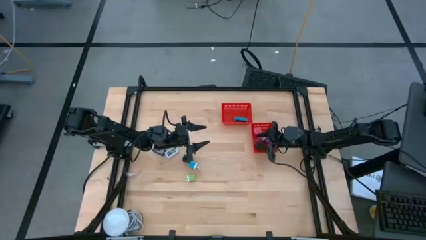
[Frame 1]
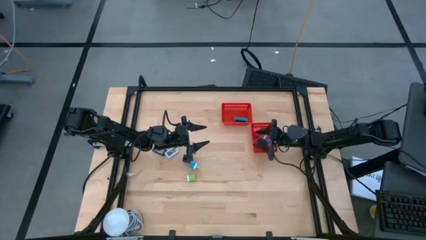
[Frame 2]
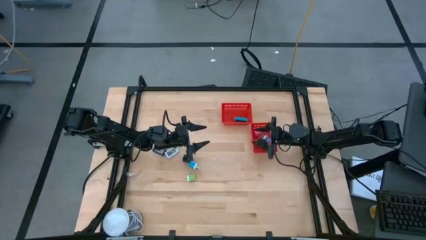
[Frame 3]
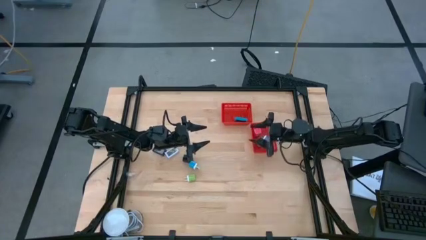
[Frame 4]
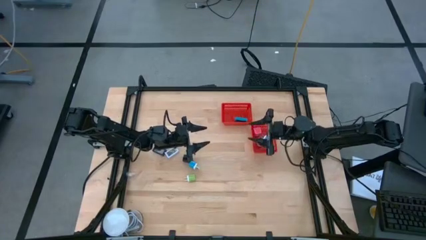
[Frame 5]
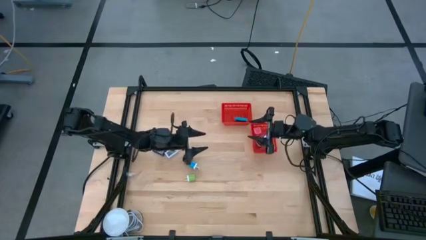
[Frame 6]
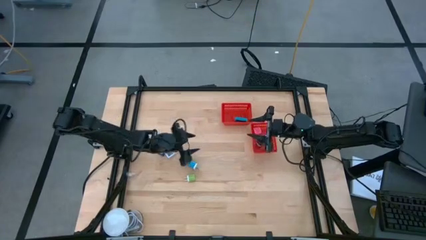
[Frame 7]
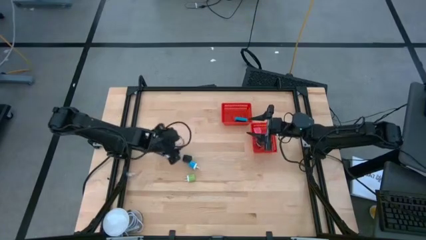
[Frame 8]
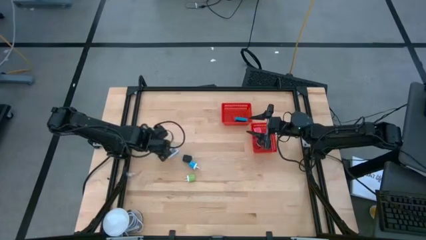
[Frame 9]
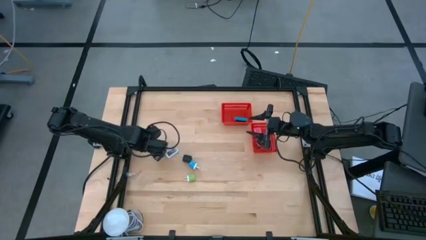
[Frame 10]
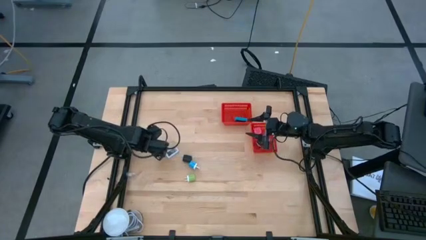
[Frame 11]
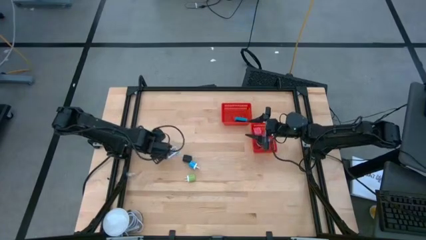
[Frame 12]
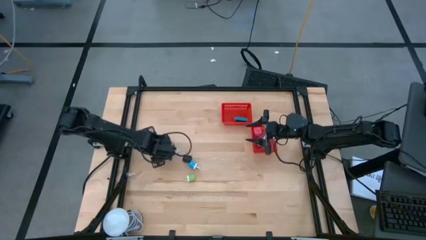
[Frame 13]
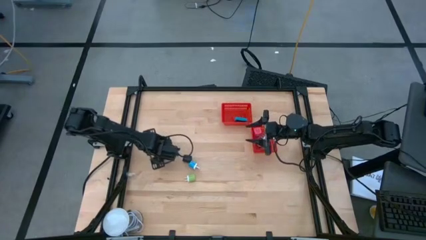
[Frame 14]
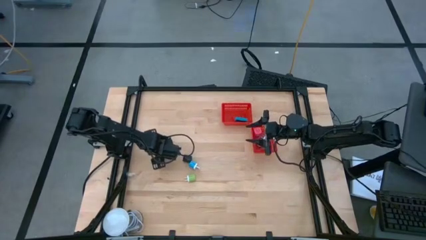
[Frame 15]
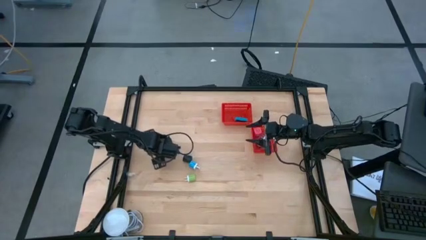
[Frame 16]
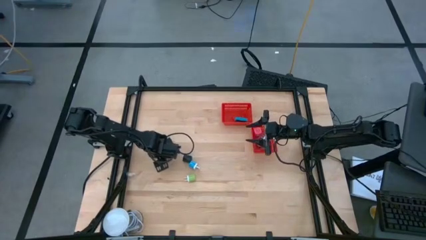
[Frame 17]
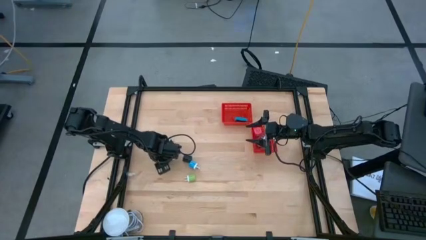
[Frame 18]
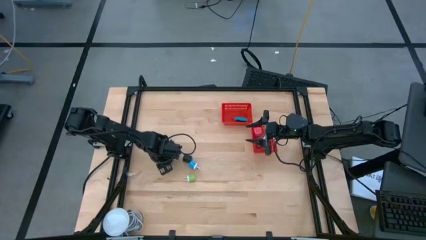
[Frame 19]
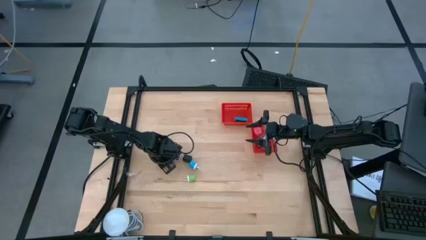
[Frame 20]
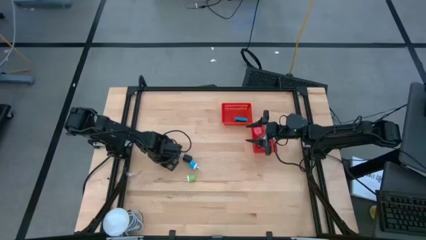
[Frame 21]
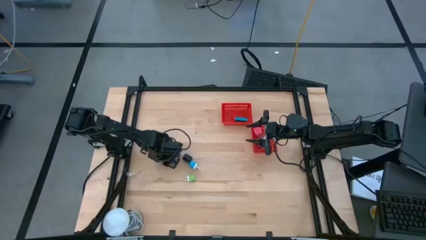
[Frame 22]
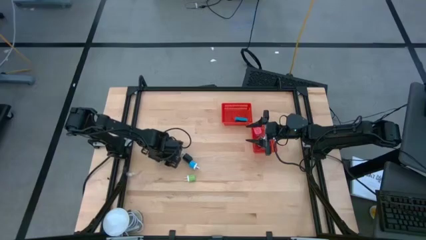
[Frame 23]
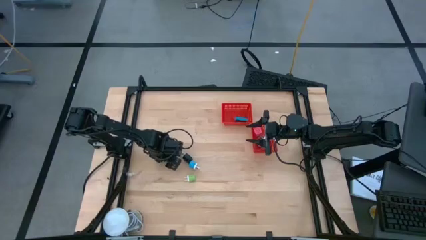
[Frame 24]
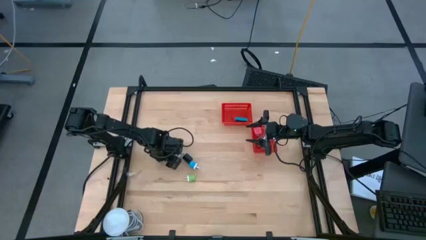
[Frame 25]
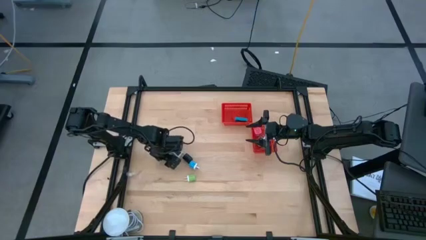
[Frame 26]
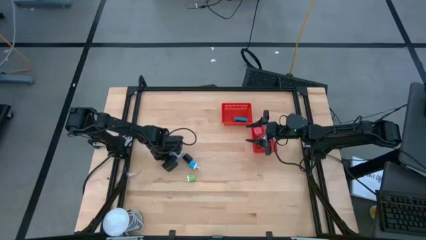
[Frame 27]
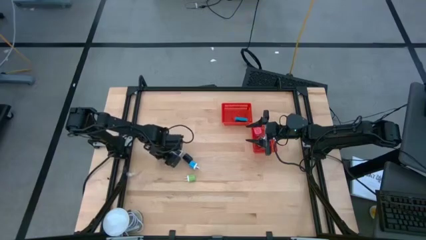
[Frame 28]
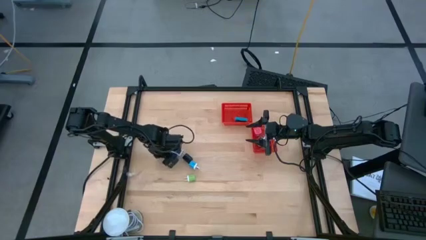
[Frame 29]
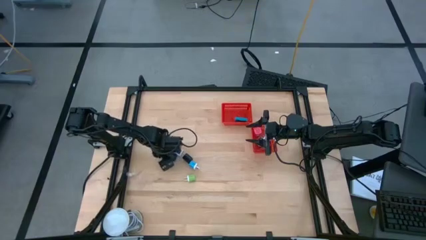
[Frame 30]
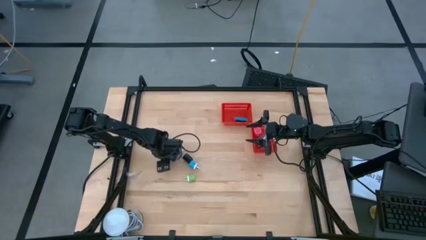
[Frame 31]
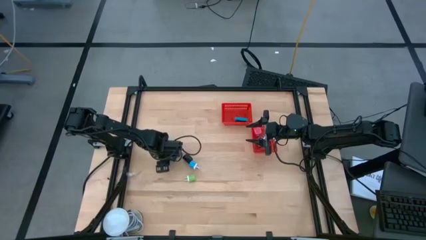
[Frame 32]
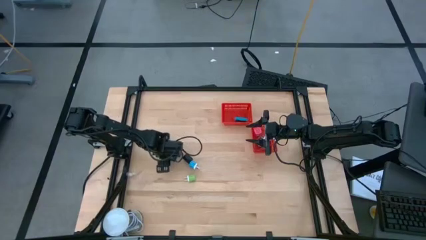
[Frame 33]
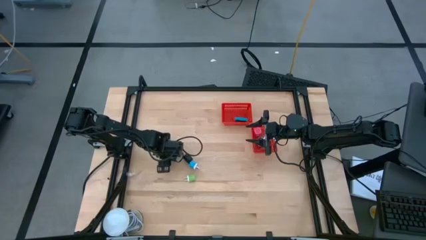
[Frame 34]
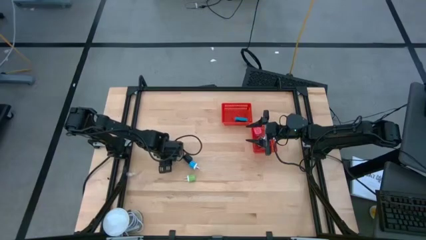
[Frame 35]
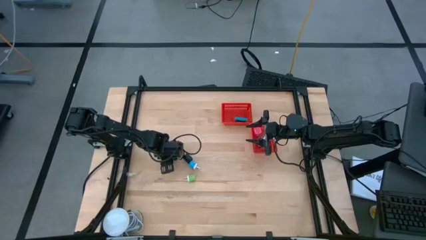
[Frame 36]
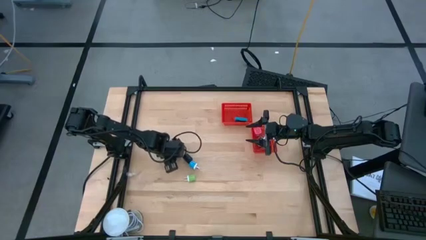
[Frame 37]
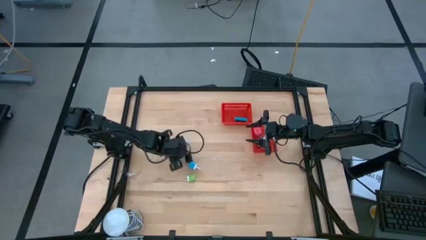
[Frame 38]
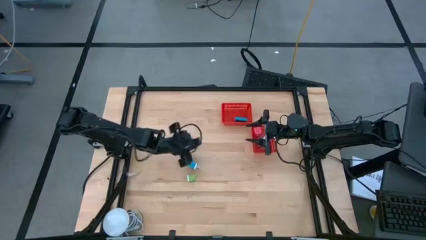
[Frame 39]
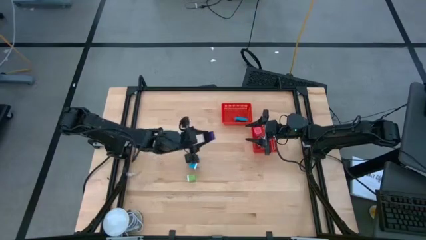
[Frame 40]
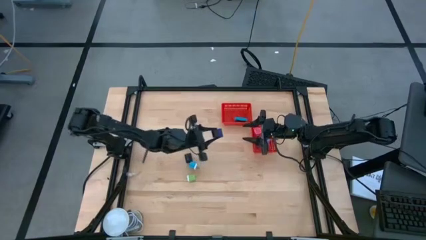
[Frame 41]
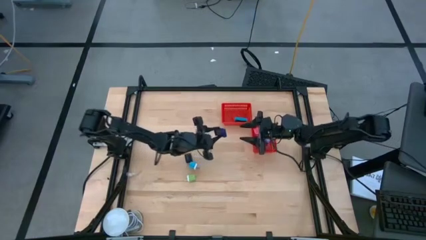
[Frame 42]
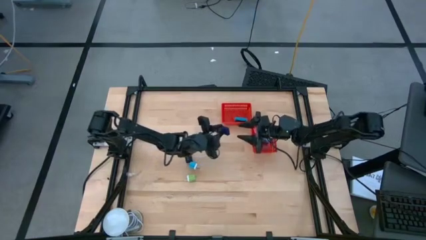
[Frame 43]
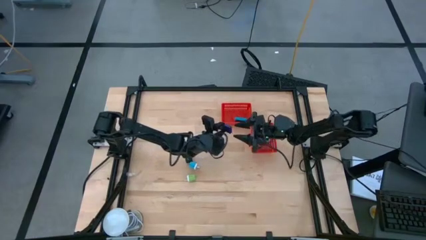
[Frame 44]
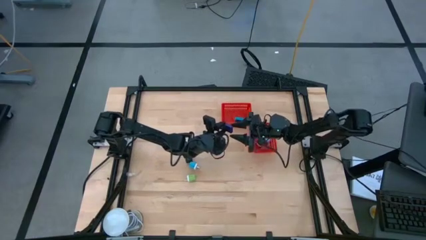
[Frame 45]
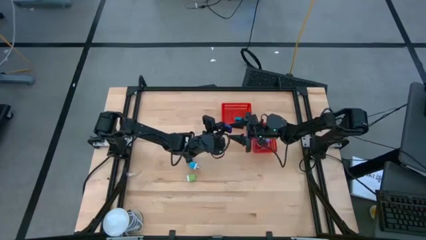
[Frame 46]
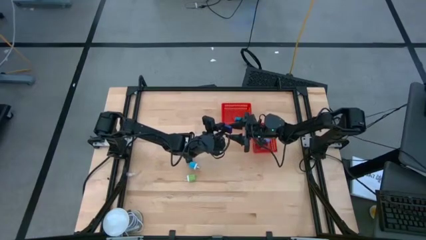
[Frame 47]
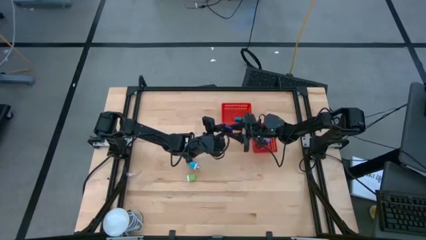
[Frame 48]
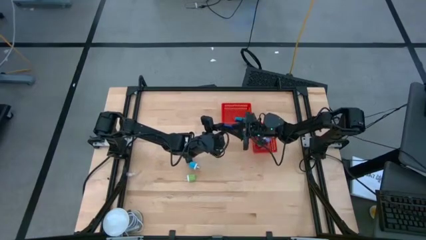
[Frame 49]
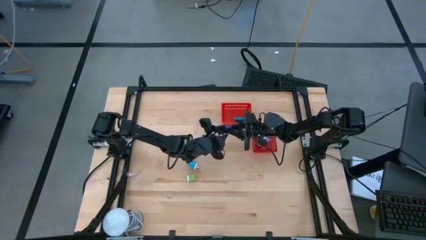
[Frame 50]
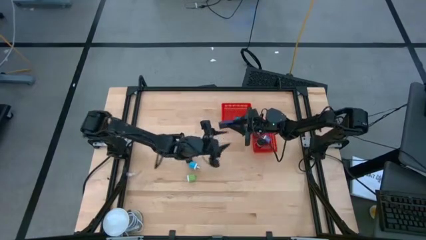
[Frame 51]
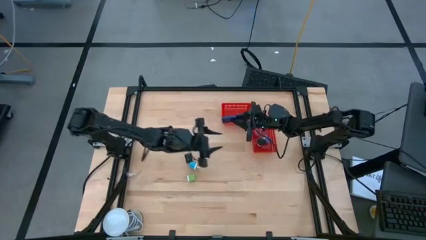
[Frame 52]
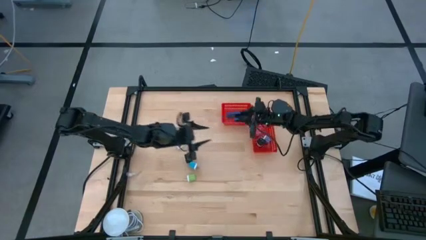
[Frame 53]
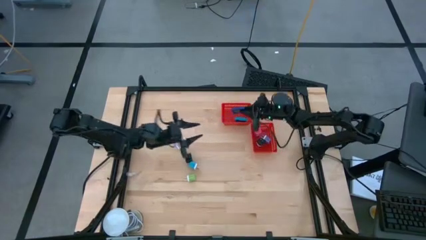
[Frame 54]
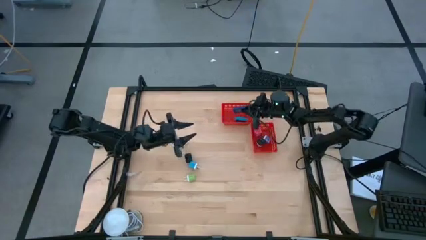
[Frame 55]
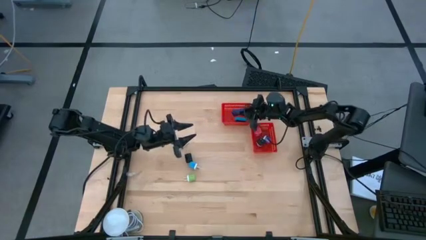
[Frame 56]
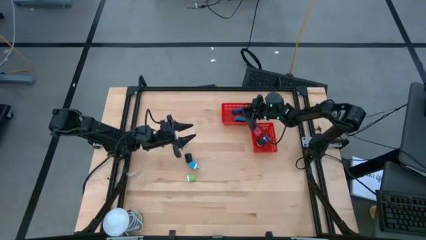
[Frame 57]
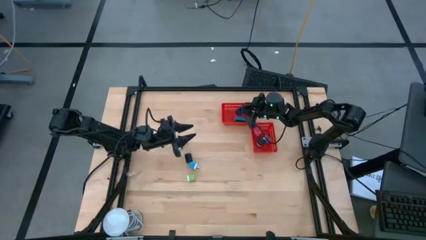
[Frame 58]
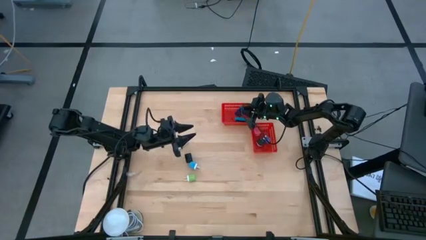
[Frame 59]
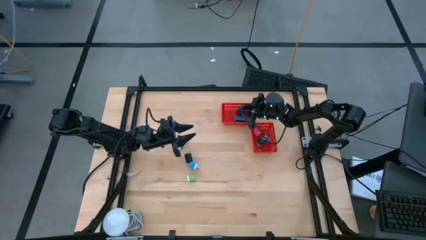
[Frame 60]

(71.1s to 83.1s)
Task: Pick & Place Office items
Put the dark blue digital clock into the top red bin

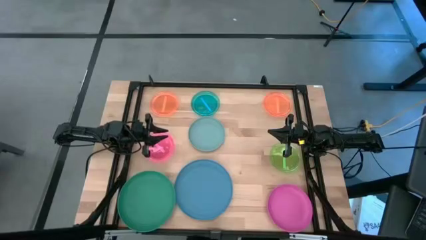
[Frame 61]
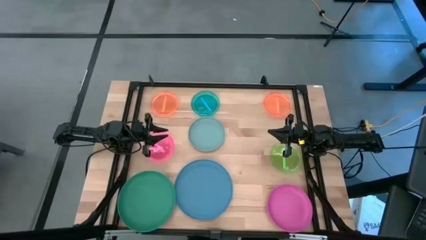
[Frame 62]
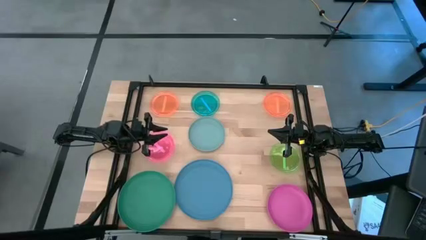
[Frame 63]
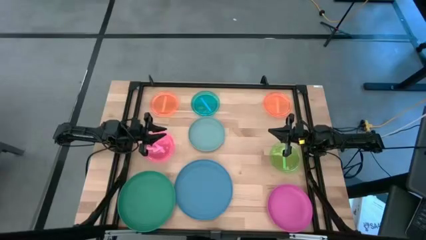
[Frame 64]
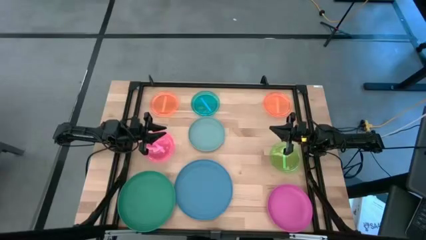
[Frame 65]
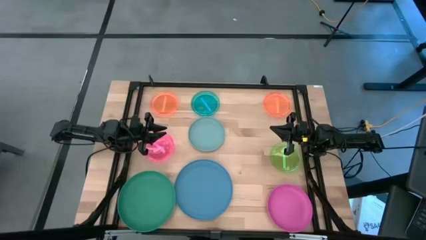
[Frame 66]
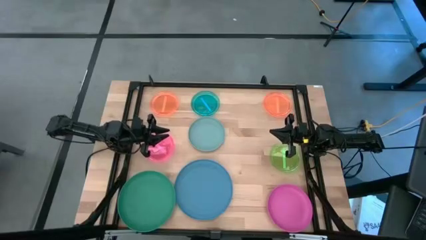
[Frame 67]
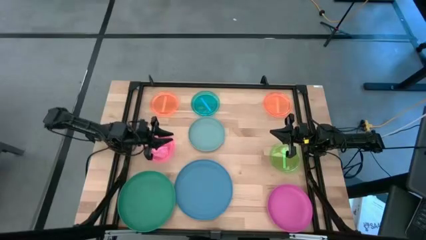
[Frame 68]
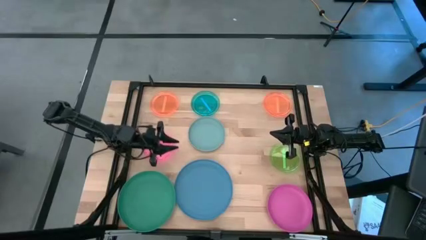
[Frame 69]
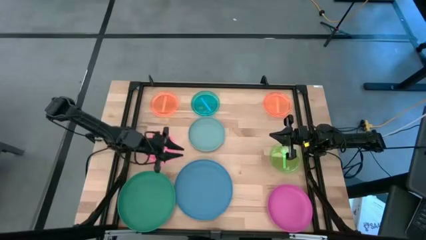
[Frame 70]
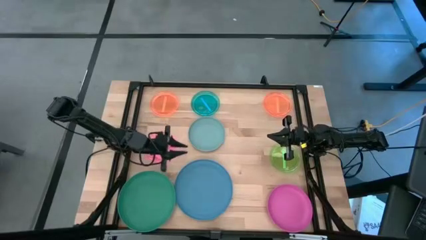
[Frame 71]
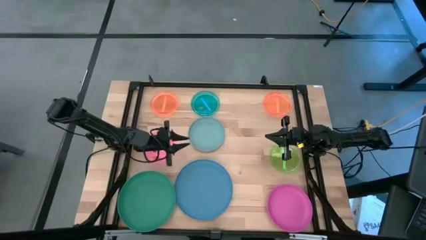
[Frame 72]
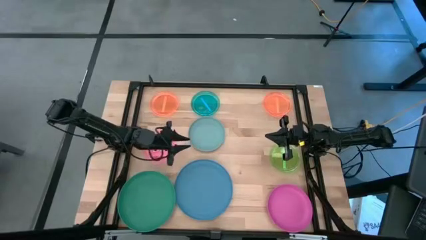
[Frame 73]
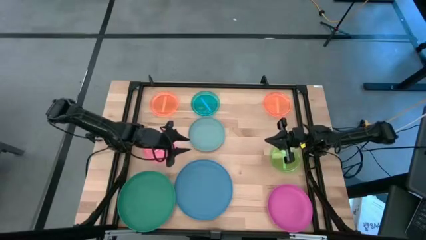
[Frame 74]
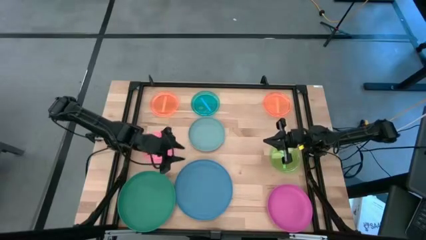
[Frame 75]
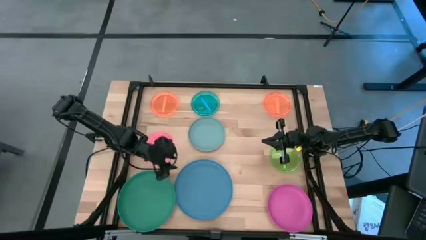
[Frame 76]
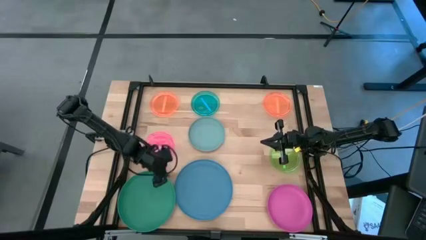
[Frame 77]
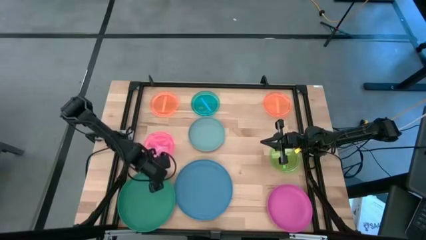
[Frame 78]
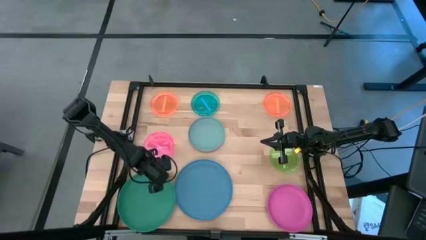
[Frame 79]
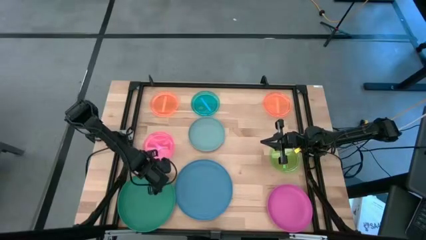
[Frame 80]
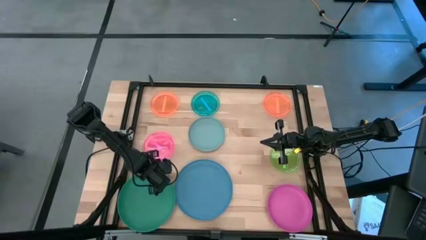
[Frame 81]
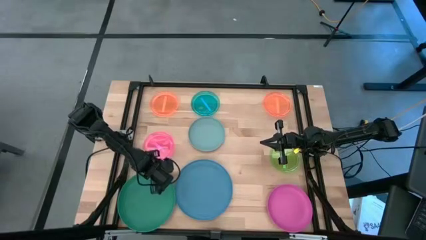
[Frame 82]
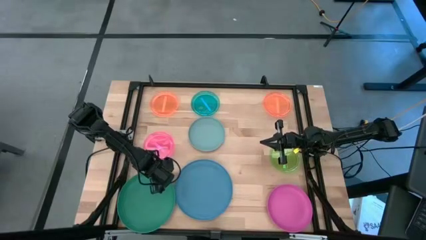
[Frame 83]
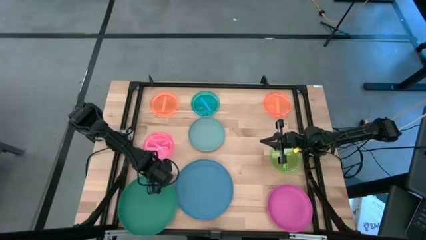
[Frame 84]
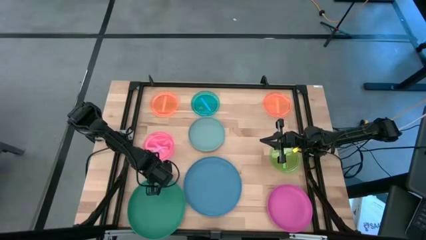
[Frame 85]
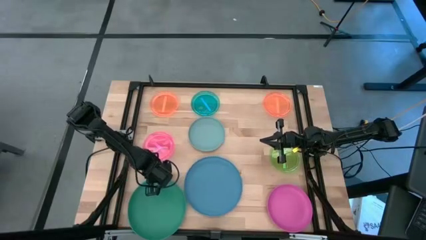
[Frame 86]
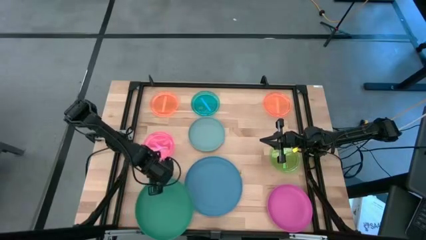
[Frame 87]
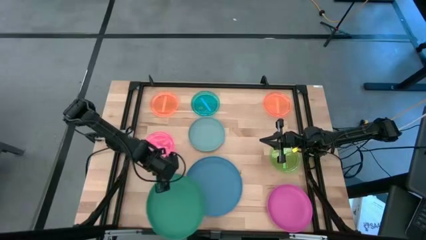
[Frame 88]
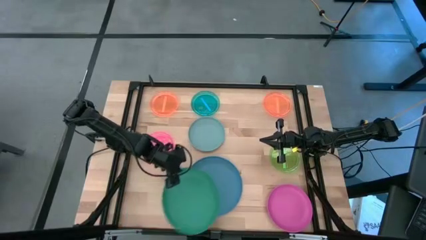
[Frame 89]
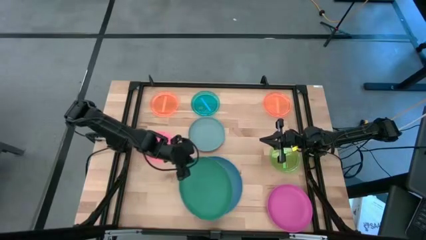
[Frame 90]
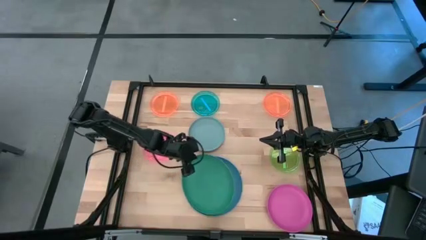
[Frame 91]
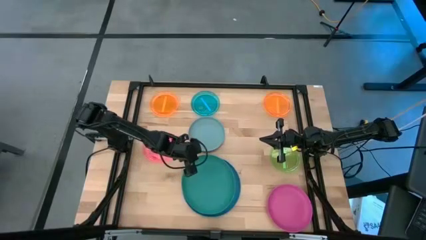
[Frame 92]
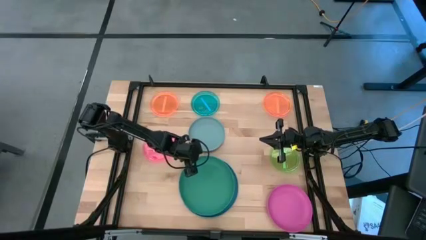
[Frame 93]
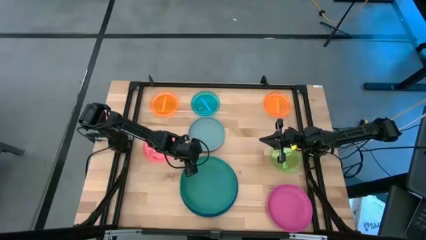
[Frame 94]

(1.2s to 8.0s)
Task: Stack plastic plates
Stack the dark green plate on the dark blue plate
